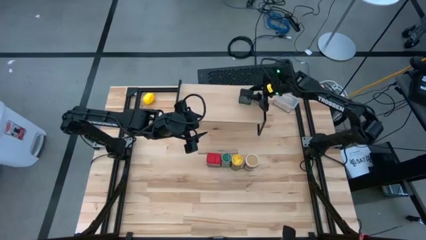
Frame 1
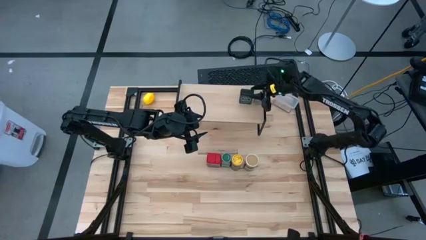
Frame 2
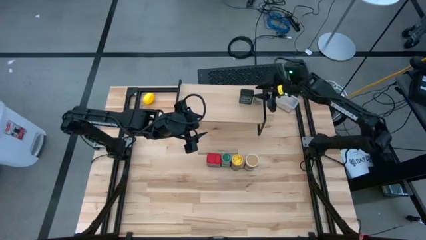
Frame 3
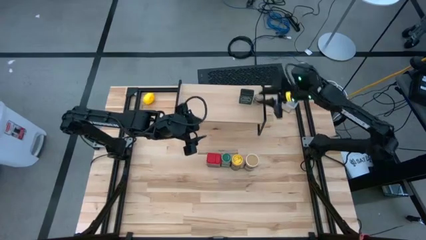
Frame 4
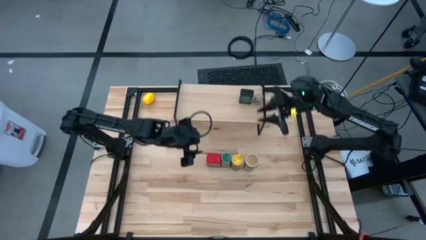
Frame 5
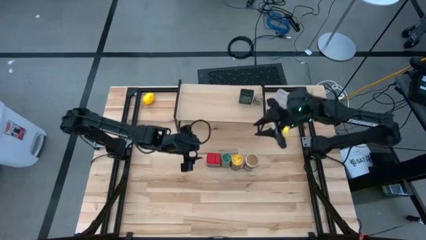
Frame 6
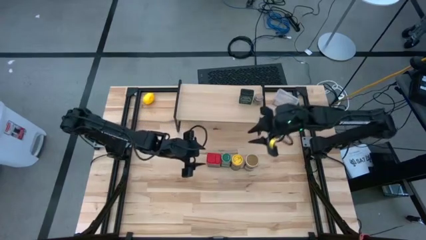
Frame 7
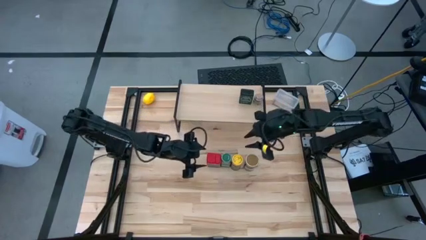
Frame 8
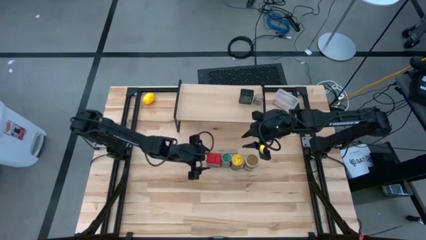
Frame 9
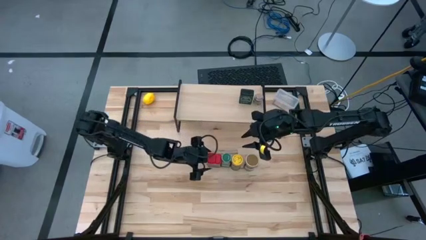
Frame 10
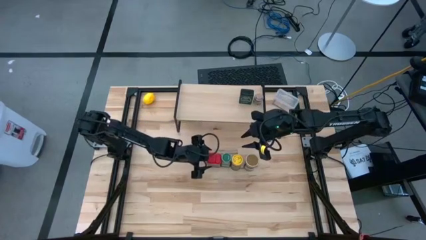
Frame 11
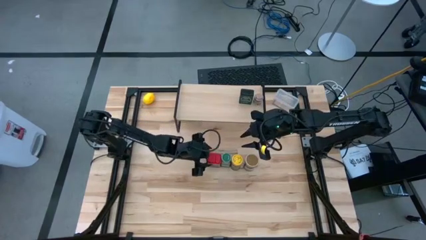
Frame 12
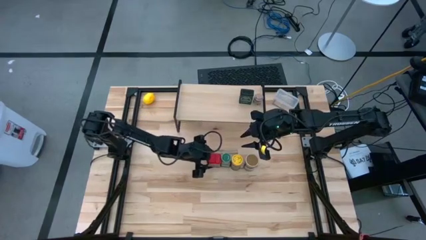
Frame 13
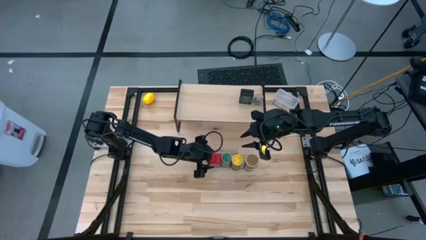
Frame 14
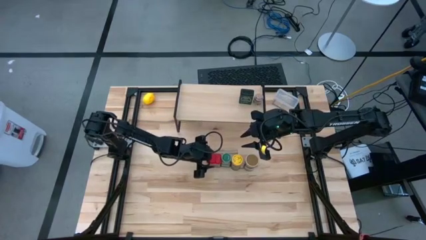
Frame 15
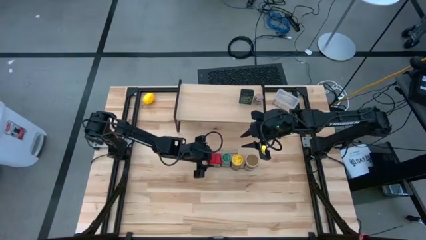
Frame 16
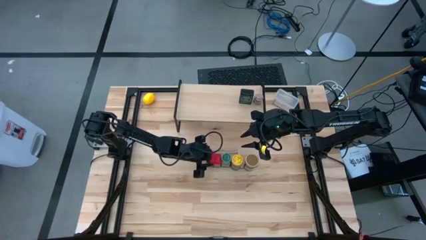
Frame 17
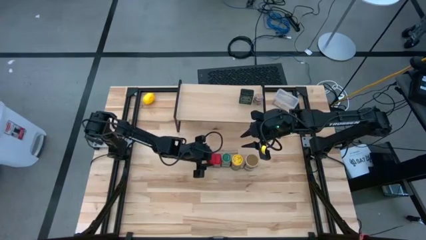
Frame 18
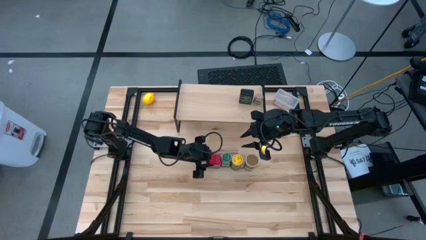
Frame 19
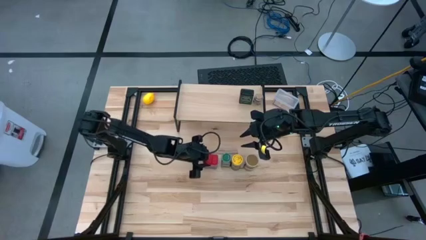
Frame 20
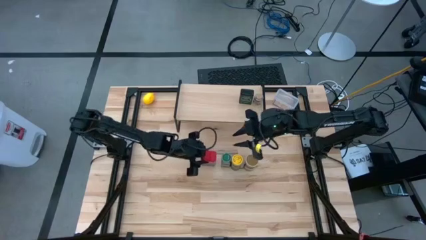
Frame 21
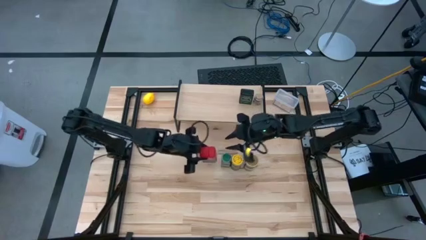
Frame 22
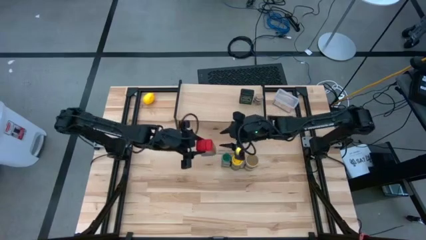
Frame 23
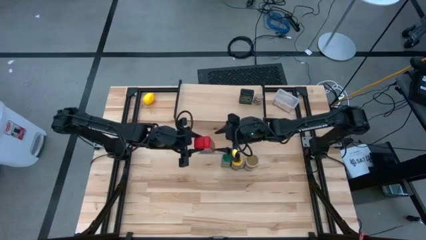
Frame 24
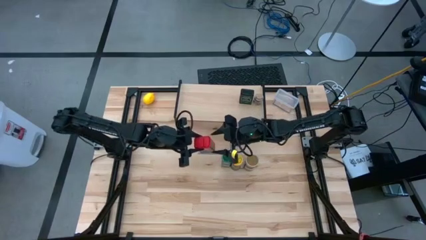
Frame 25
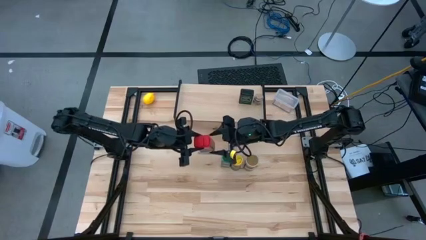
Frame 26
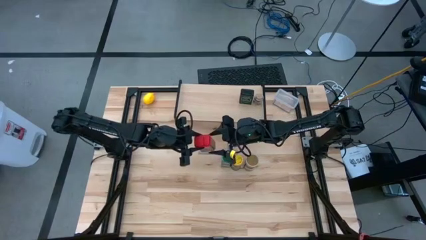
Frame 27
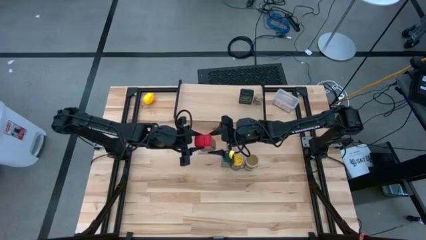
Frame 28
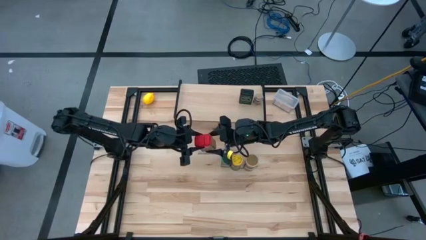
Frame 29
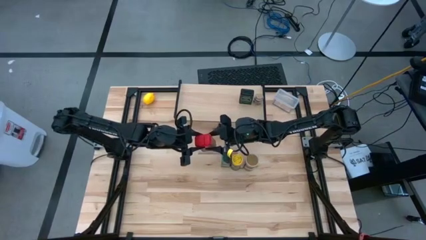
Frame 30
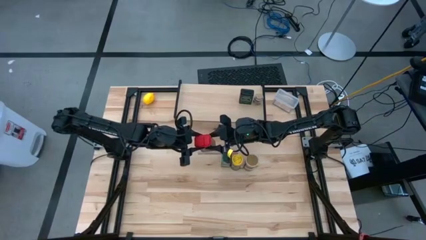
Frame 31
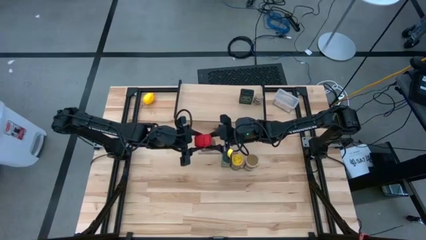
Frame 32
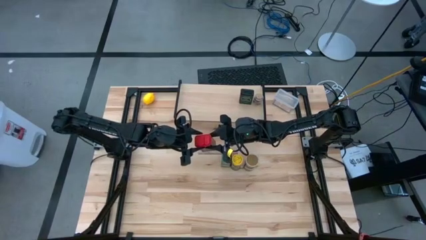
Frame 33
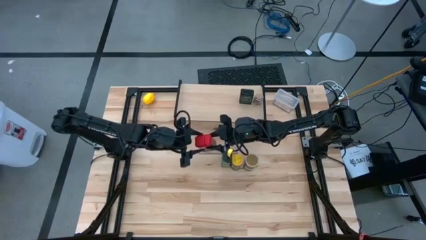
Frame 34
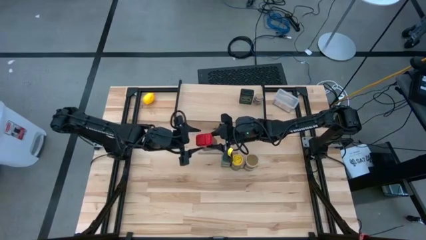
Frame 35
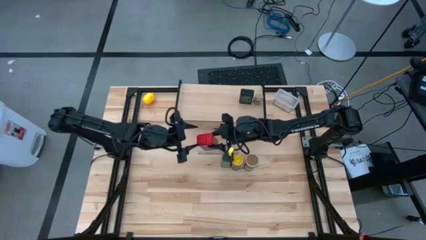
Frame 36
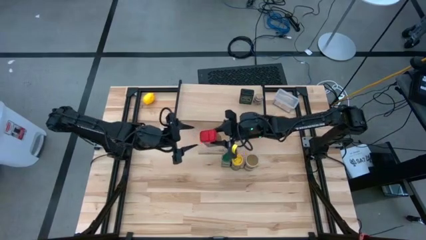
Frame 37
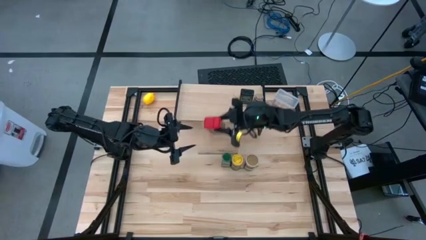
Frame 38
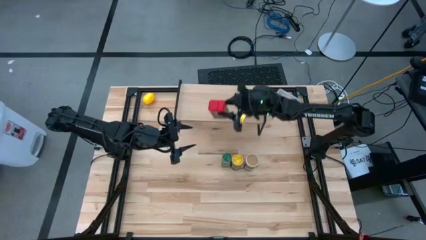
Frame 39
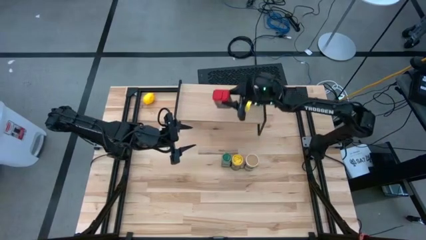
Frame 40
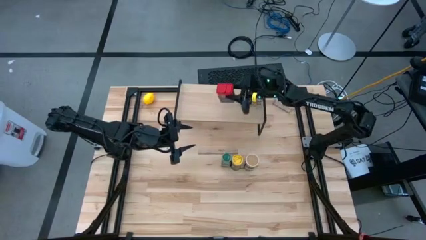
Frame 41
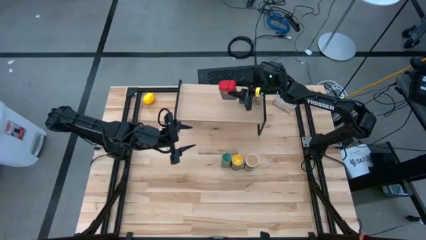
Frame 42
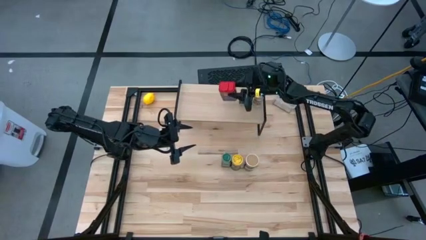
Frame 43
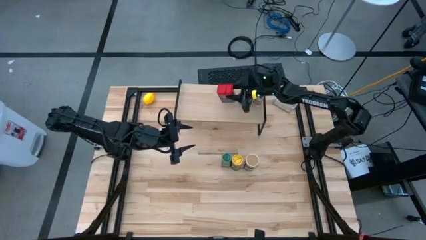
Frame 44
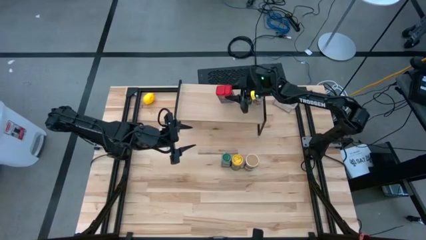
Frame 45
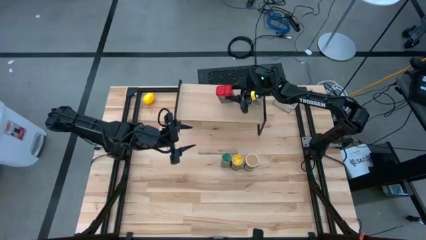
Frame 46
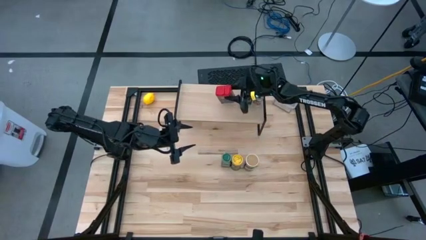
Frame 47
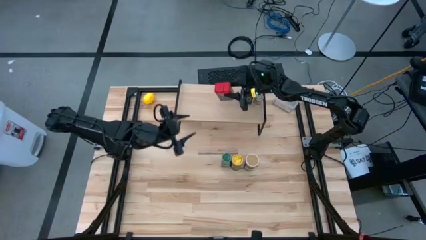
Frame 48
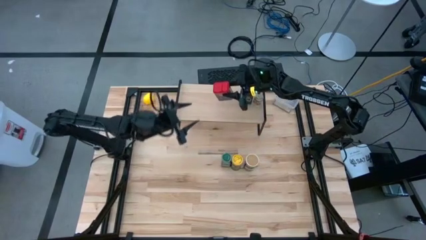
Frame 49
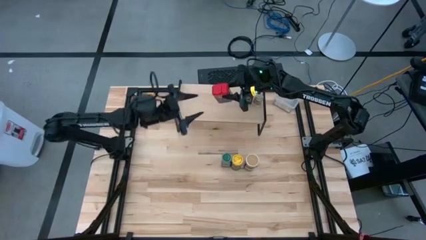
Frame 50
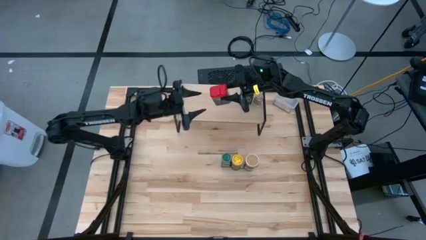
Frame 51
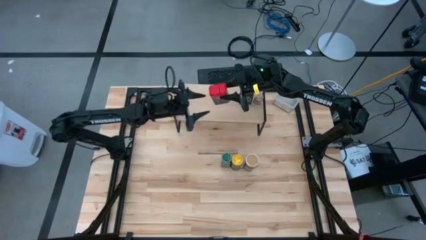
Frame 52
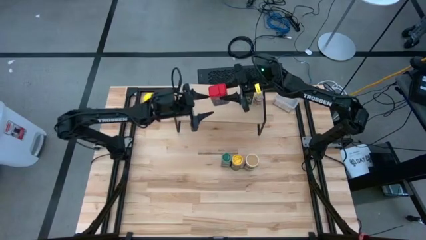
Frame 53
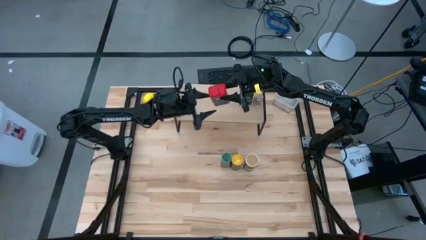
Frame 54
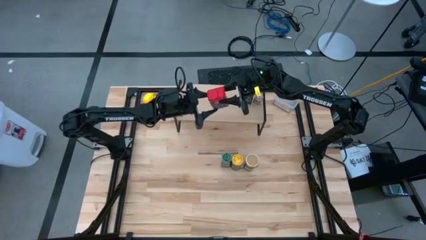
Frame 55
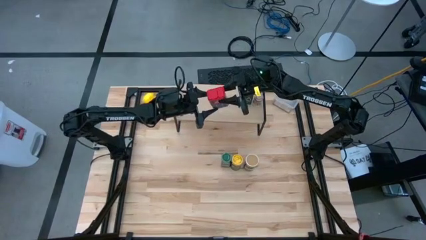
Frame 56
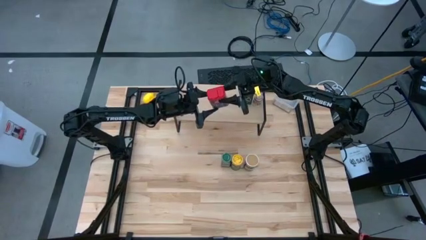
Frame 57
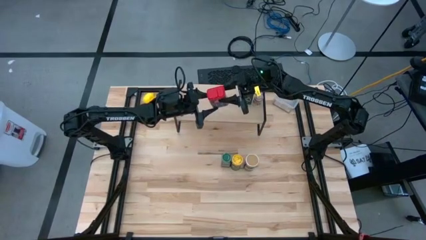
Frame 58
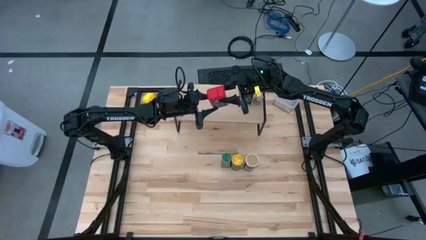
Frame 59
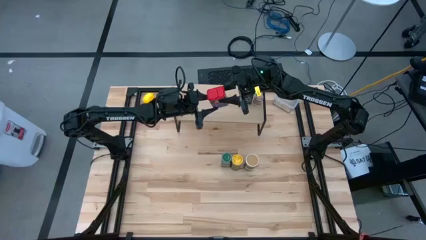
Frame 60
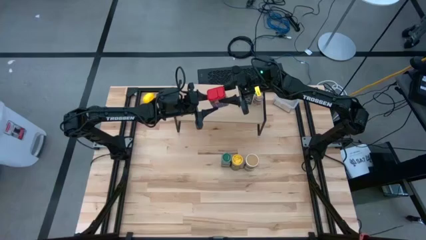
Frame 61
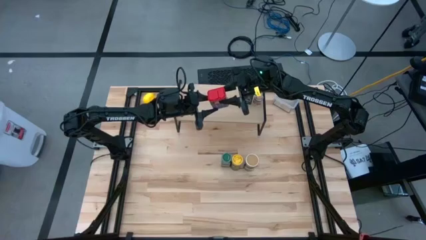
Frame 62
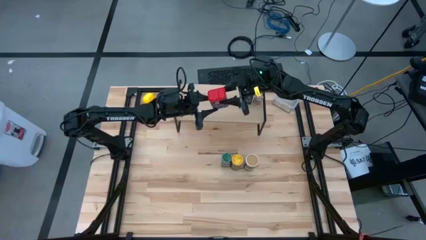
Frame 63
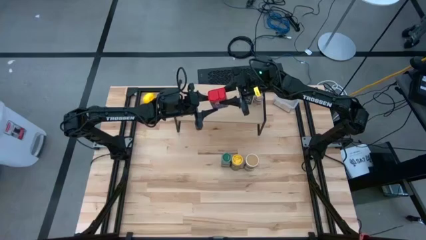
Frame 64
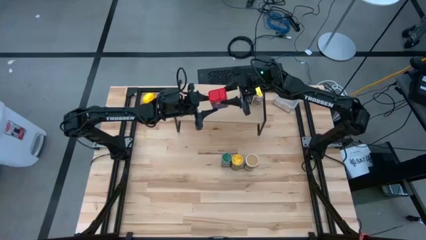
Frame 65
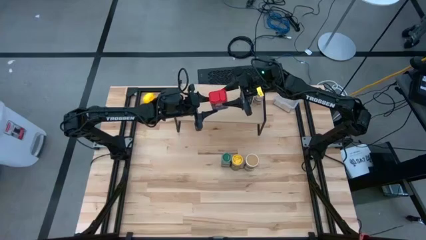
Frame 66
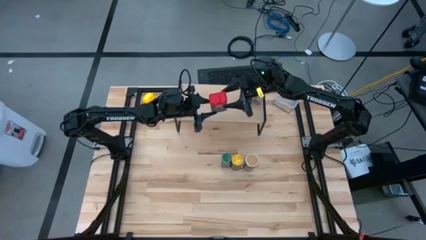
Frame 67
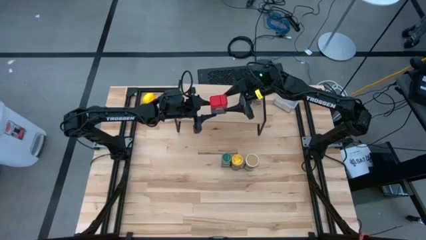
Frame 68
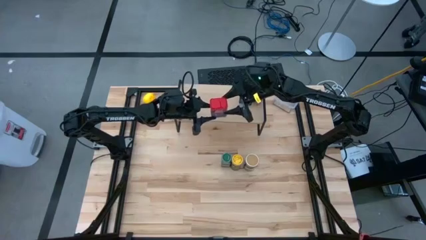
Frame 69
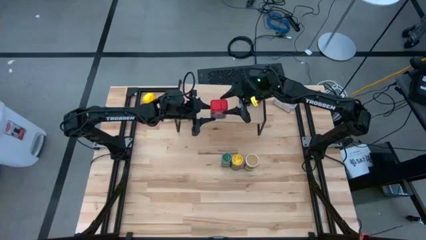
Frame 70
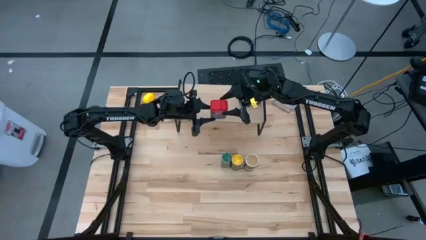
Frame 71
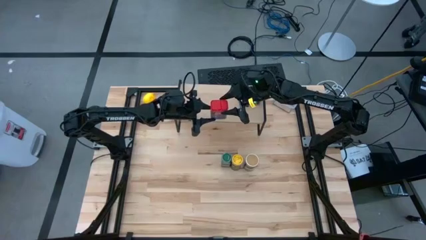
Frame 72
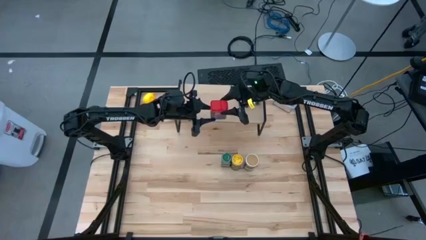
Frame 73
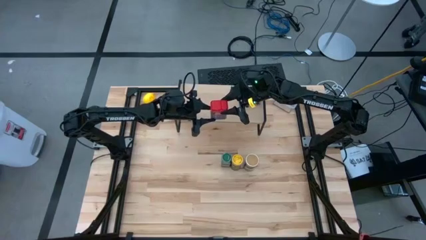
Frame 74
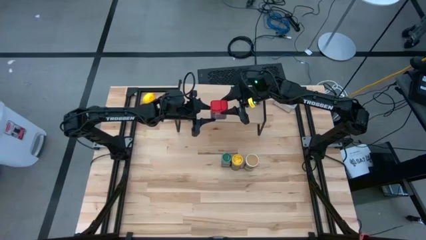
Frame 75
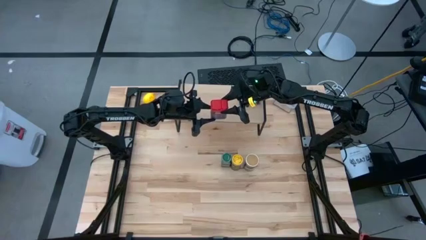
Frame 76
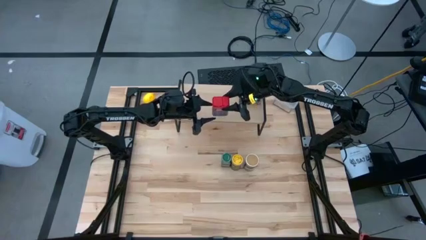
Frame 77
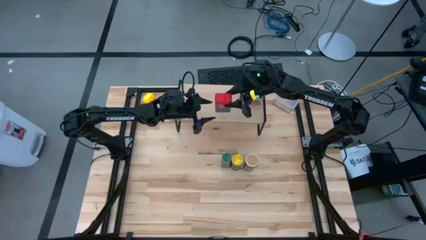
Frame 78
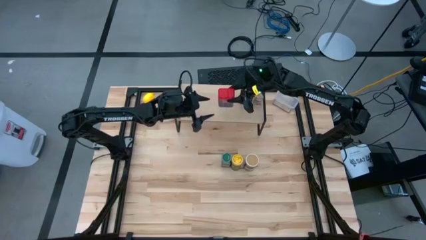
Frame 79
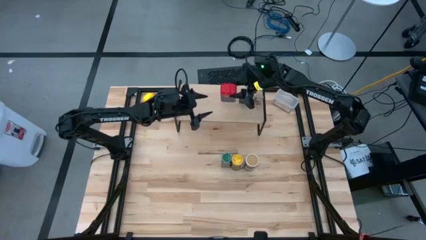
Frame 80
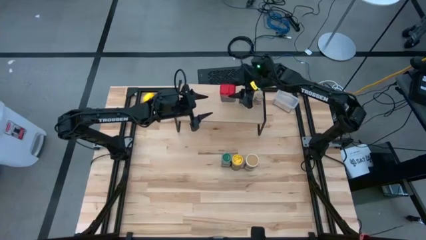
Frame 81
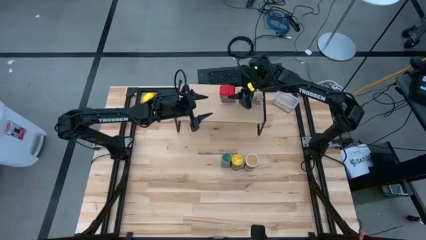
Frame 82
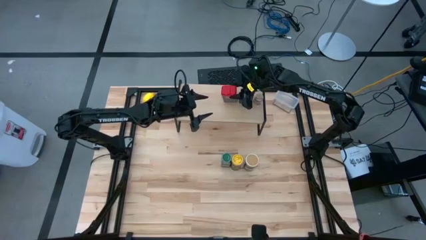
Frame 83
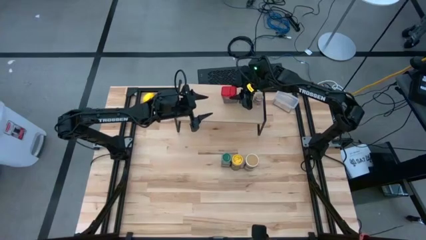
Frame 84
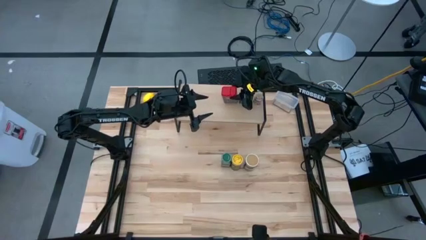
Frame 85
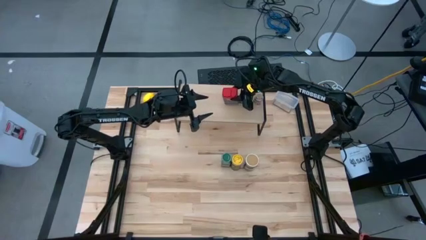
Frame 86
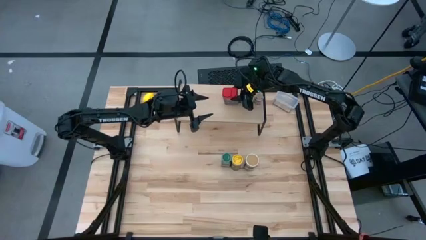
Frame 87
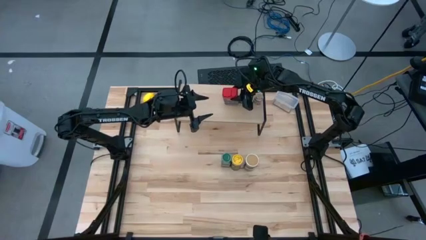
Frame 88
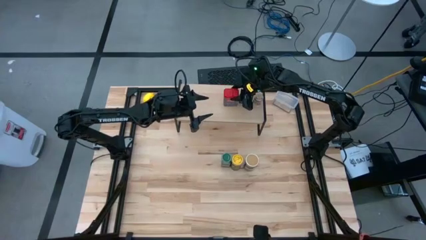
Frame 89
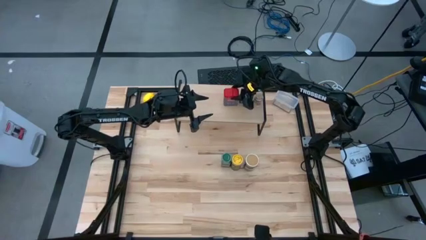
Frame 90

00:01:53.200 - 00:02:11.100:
Task: Shelf spices
Put the red seasoning can on the shelf
